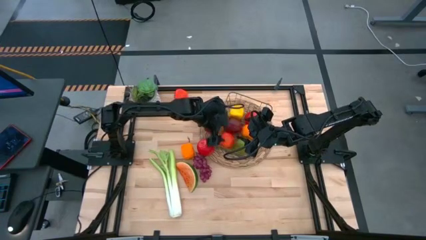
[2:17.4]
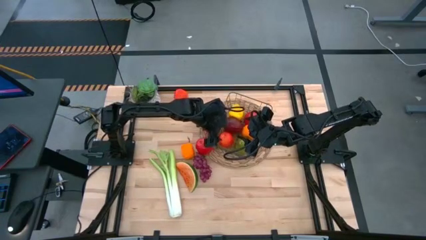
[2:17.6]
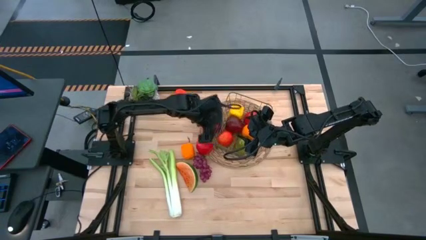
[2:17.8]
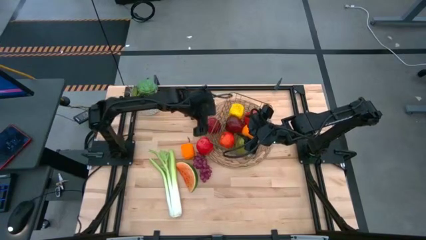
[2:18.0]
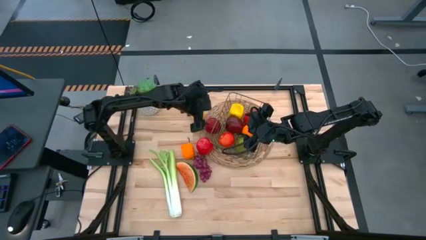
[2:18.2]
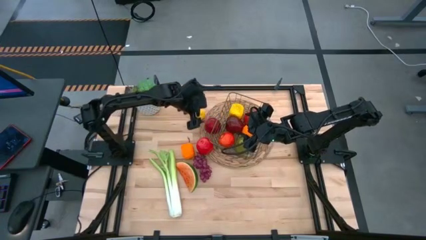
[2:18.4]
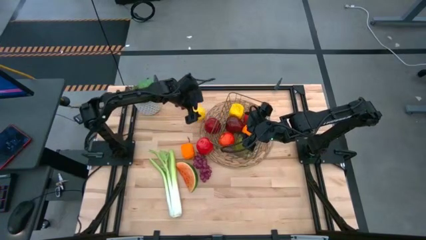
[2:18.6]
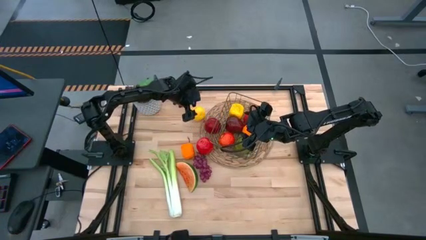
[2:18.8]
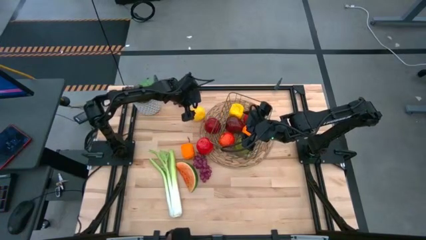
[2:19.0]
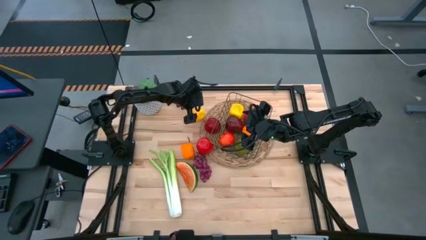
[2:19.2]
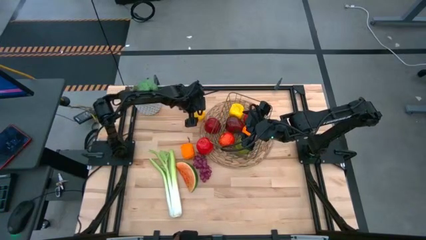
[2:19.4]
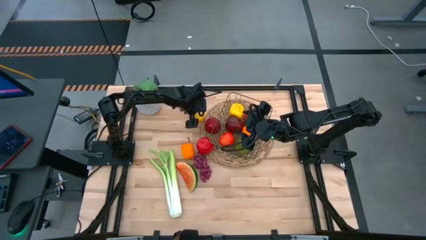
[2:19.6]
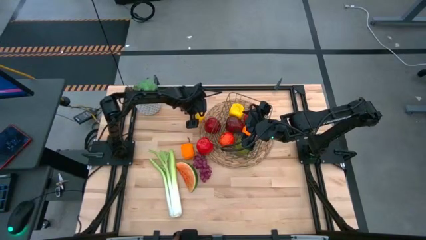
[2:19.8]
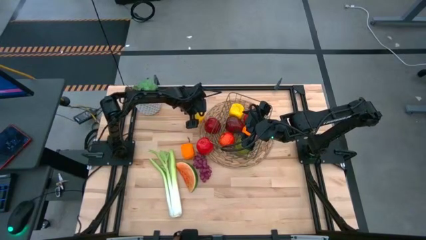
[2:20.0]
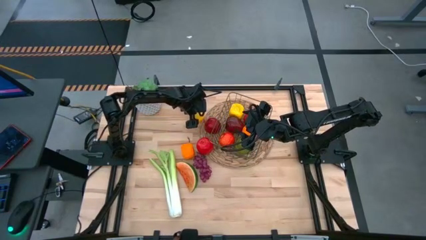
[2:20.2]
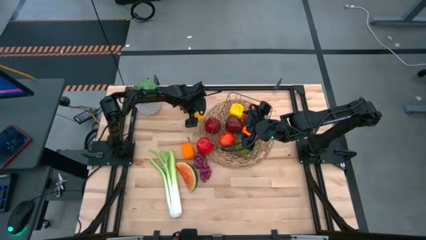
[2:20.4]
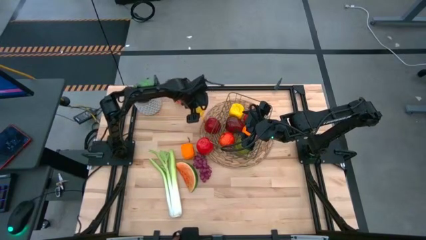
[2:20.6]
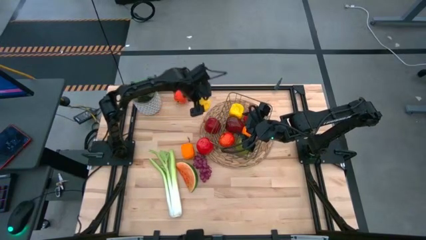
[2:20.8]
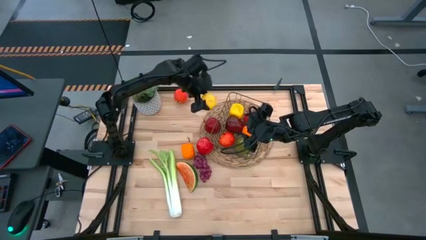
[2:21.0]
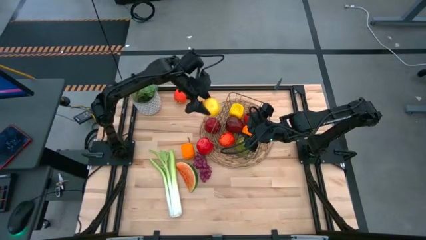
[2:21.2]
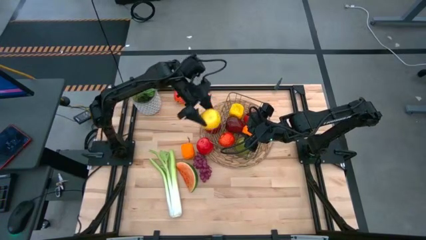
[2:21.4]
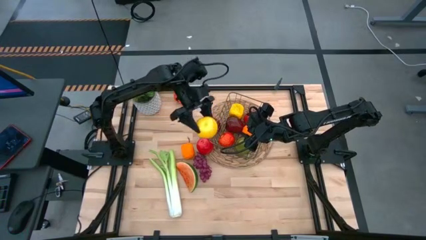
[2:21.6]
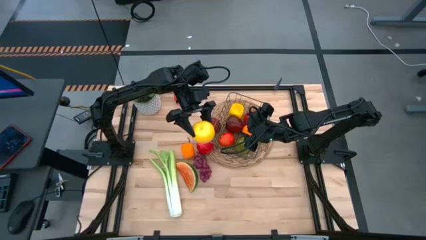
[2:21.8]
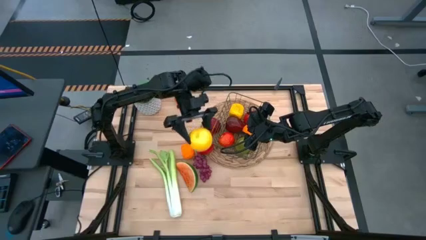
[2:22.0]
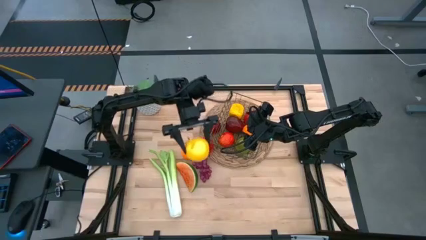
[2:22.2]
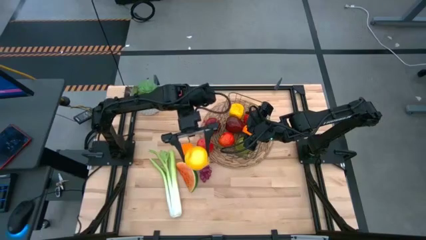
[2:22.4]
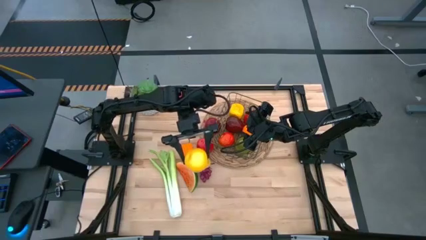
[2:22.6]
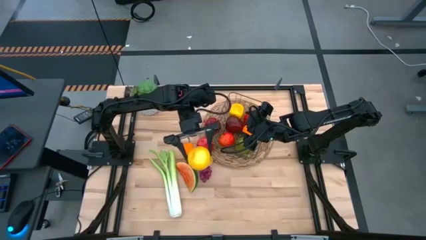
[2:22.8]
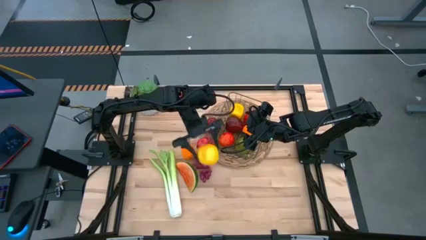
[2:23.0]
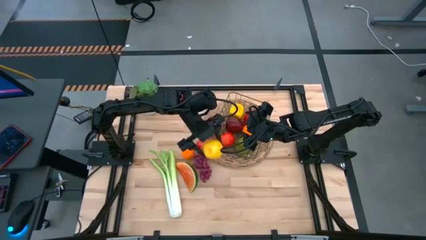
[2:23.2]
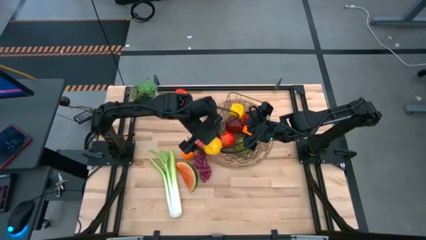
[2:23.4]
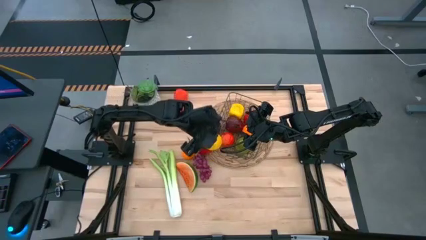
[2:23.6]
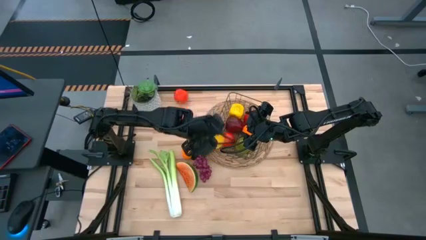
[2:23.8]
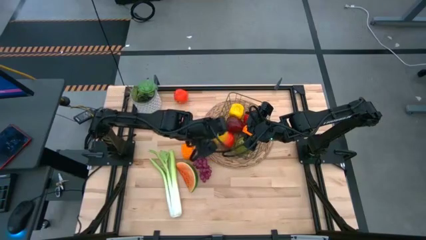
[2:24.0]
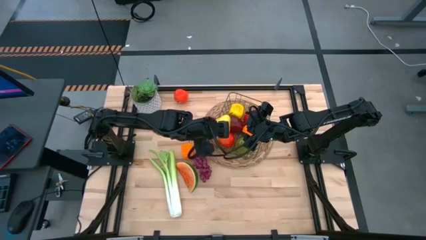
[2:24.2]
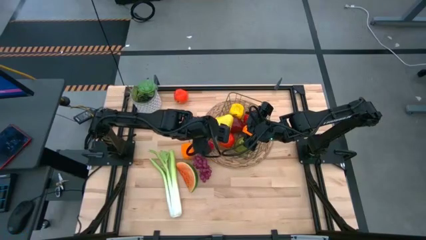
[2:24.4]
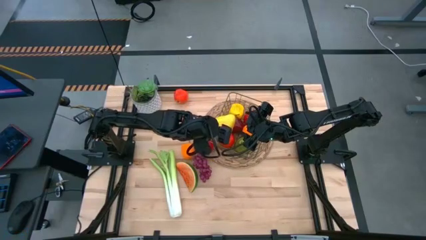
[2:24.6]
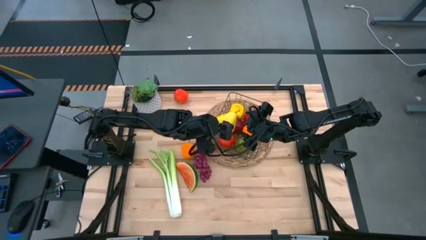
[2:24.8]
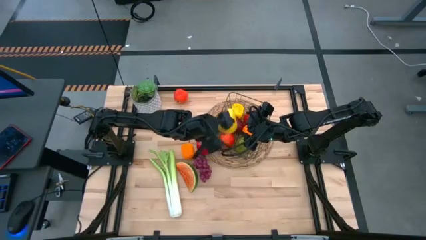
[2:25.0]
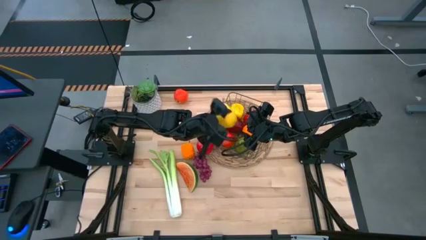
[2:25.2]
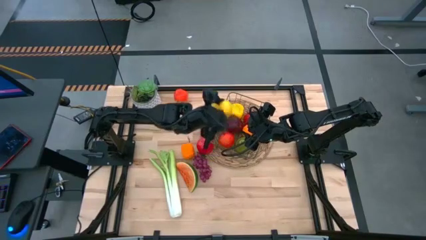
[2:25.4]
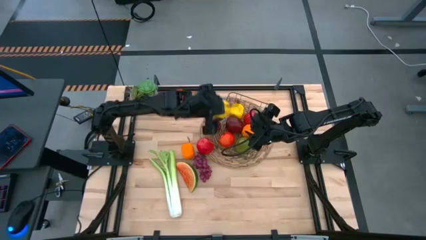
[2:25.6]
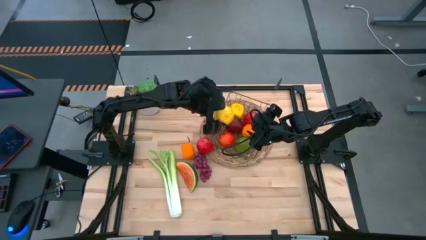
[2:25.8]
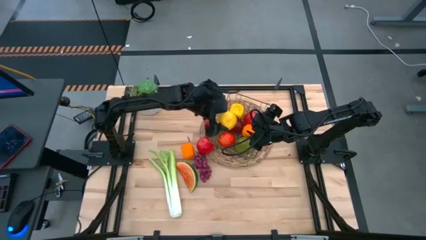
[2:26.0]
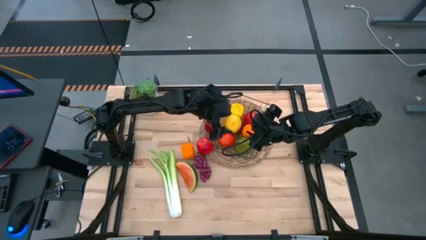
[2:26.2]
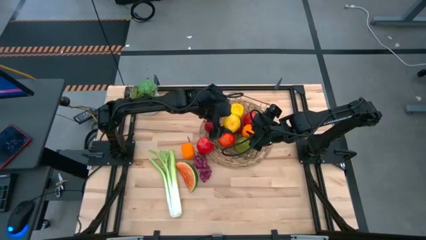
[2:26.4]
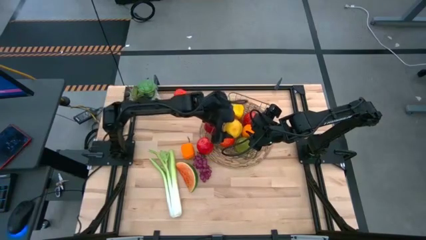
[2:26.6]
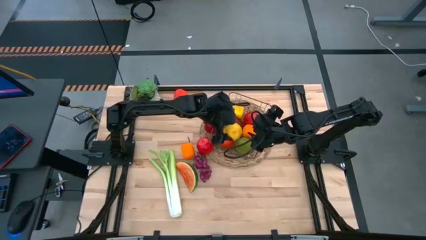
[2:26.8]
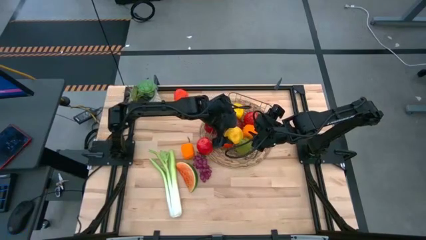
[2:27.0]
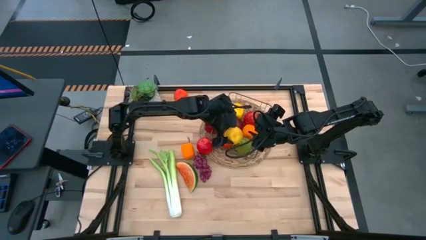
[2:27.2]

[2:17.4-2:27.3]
Task: Build produce basket
Put the yellow pear into the gold wire basket

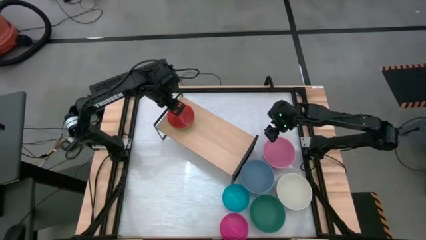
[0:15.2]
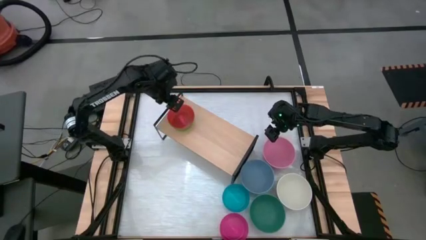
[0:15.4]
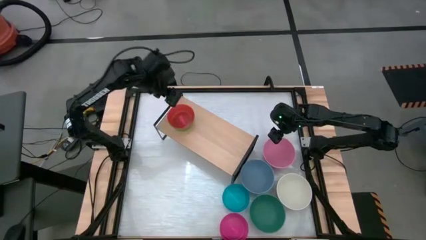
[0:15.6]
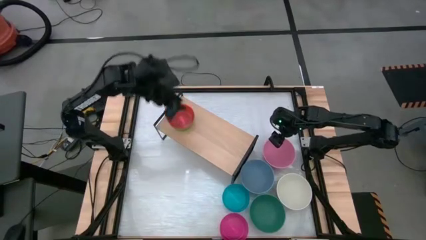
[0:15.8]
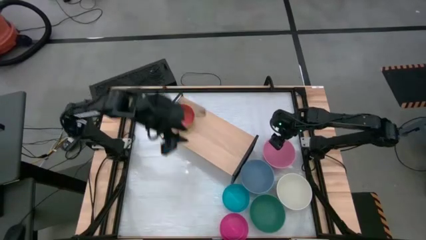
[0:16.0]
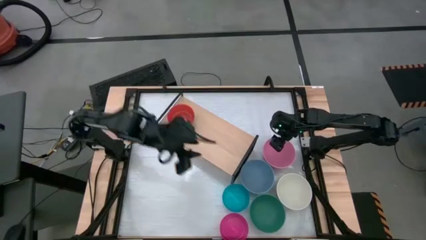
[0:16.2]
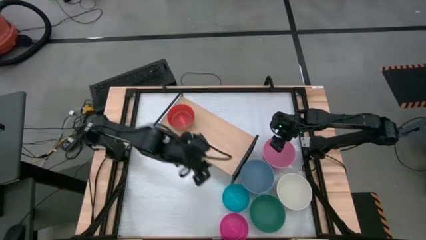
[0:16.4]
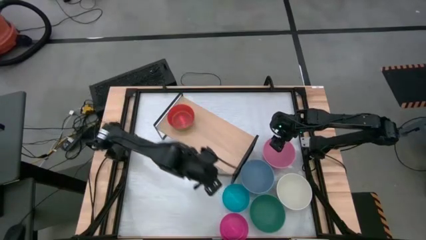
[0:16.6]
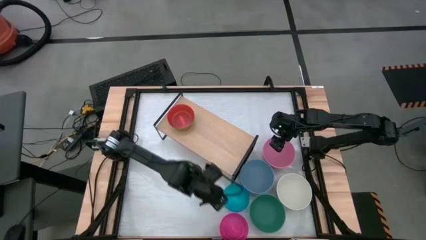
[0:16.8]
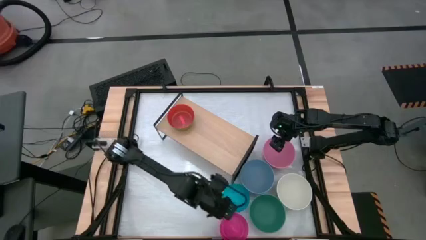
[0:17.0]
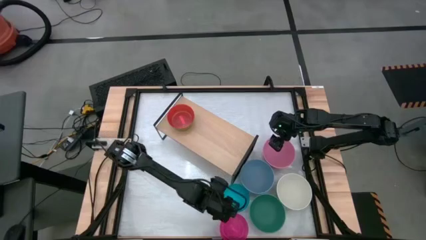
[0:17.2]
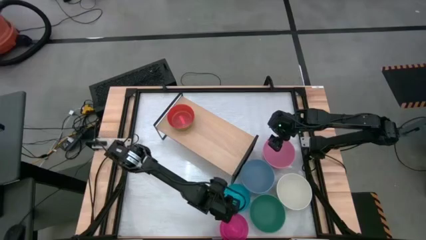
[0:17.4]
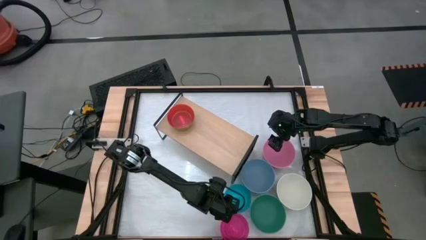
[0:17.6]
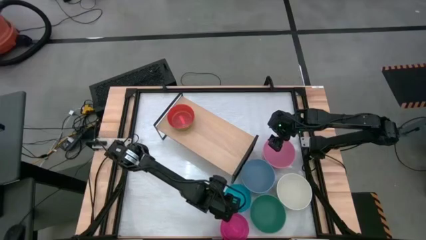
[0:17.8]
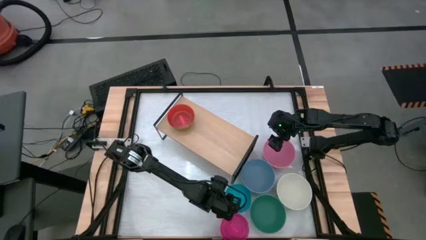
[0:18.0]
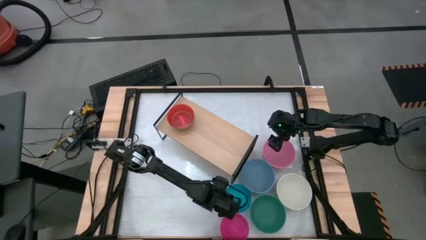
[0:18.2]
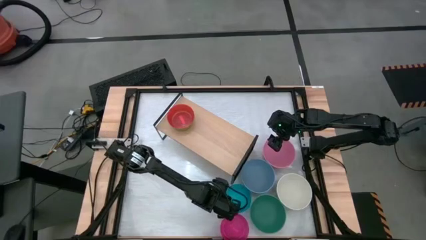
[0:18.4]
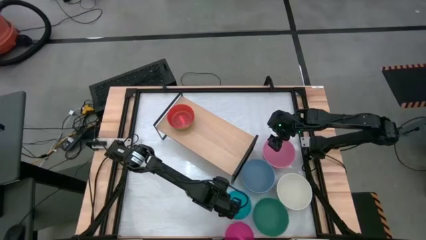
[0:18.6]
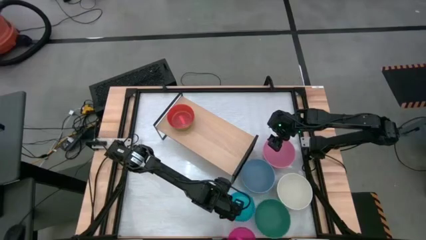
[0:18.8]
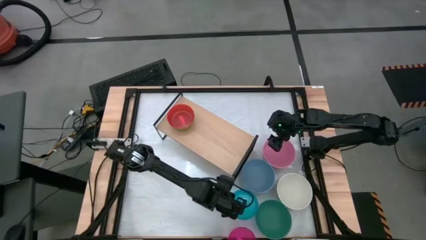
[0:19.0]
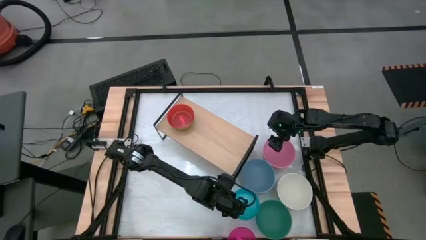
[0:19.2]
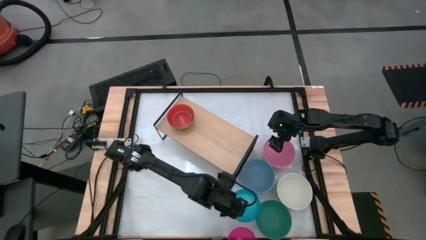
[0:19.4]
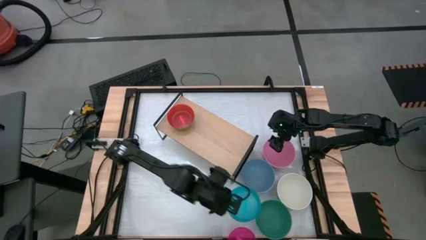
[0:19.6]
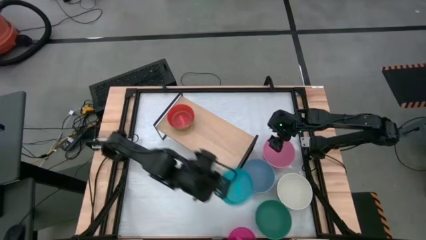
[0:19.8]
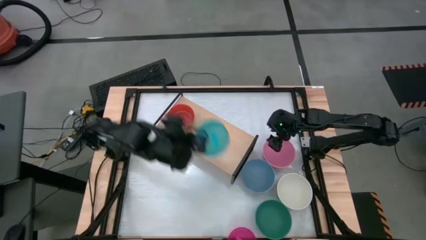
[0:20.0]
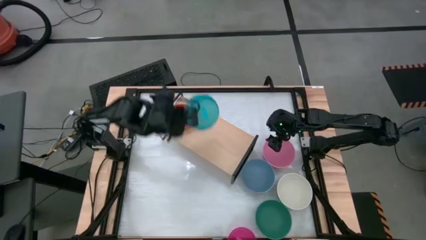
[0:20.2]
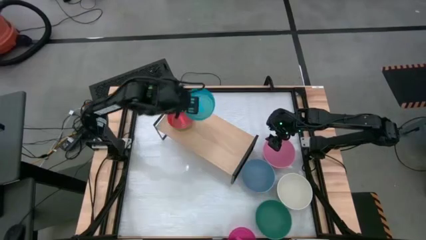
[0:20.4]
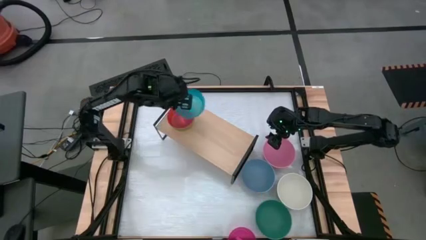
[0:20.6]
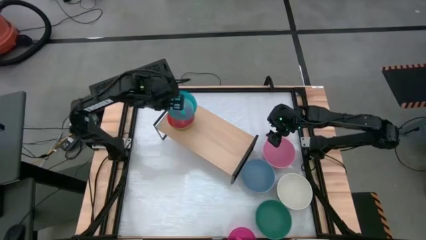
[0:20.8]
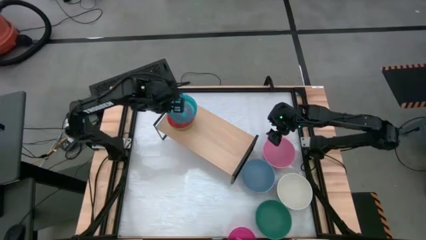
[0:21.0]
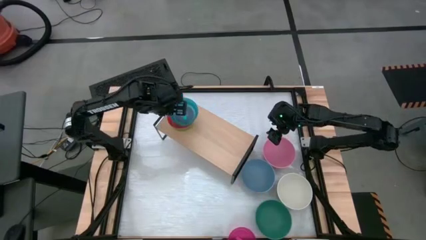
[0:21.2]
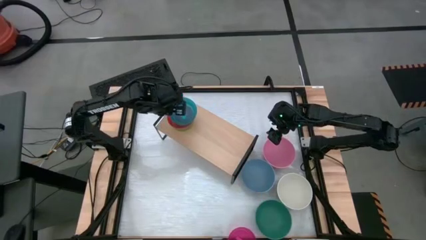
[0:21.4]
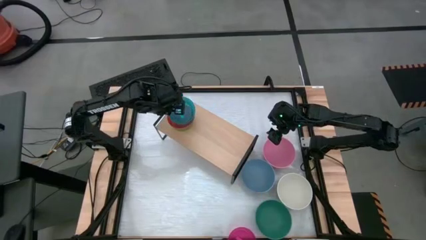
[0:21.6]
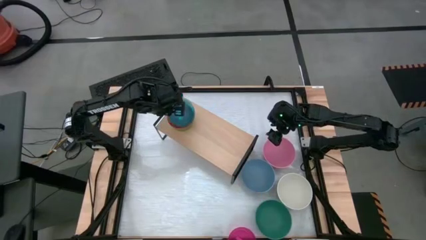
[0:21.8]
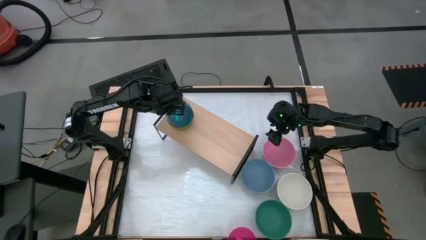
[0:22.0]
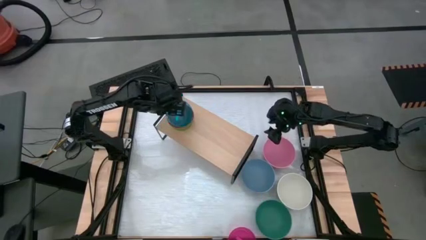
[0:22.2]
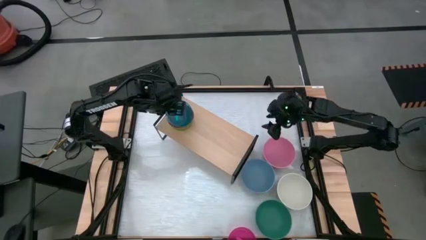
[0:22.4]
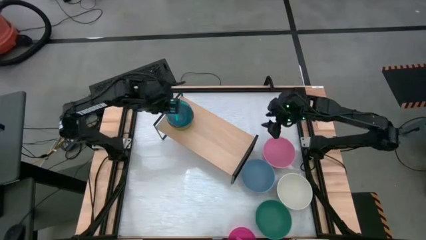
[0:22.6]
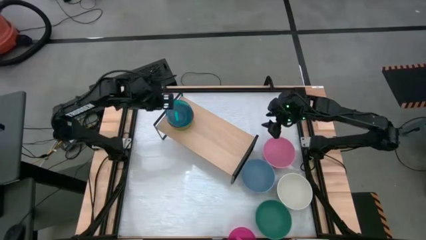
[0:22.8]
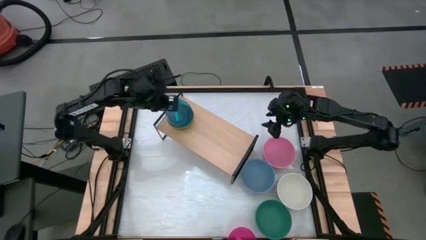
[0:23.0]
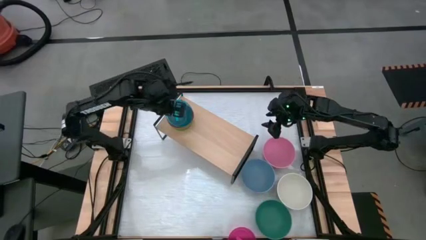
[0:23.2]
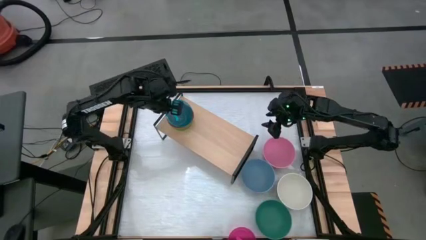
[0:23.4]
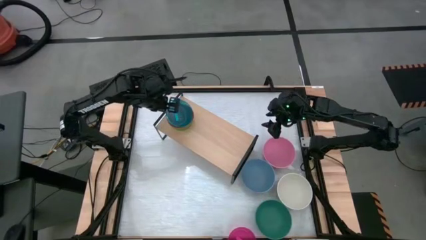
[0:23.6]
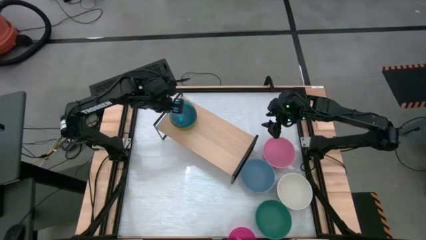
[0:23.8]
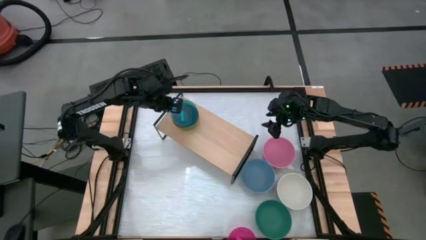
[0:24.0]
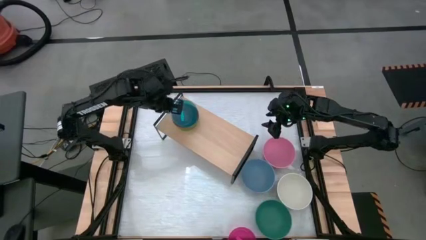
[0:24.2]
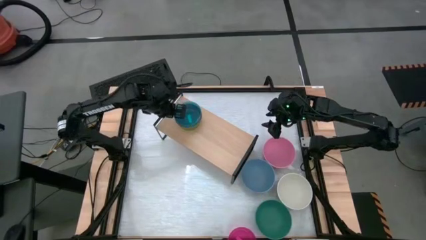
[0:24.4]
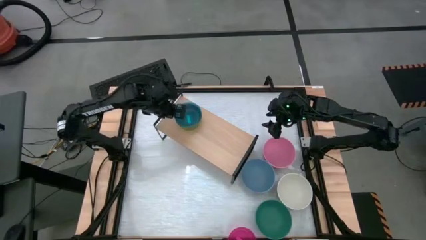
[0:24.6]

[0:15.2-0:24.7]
Task: Place and stack bowls onto a shelf
Stack the small light blue bowl on the top of the small orange bowl on the shelf
